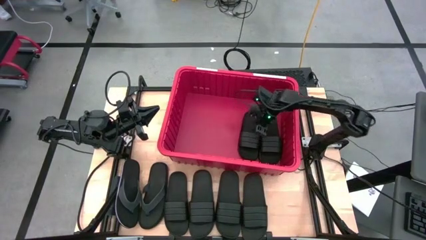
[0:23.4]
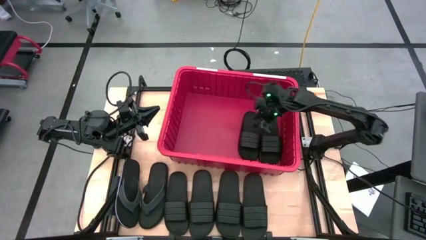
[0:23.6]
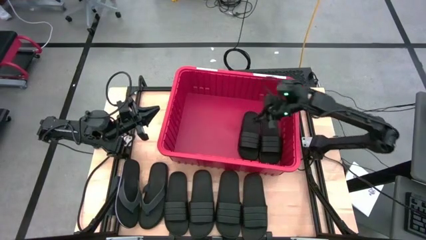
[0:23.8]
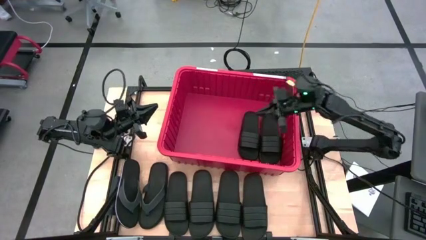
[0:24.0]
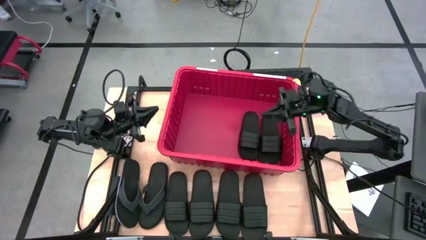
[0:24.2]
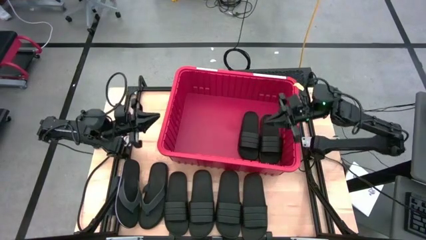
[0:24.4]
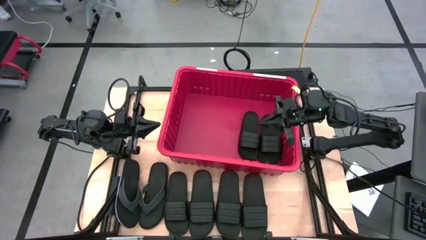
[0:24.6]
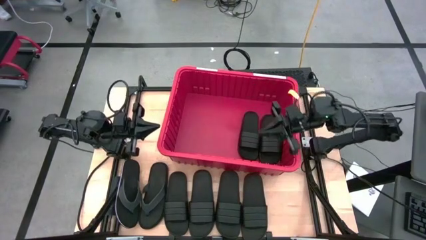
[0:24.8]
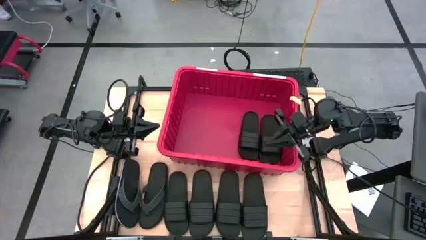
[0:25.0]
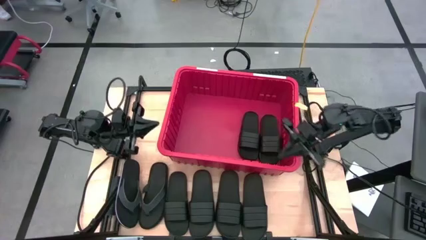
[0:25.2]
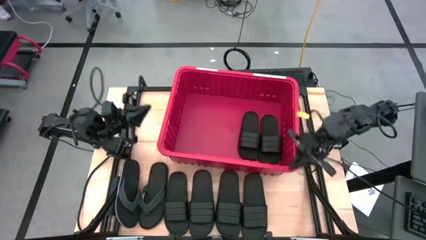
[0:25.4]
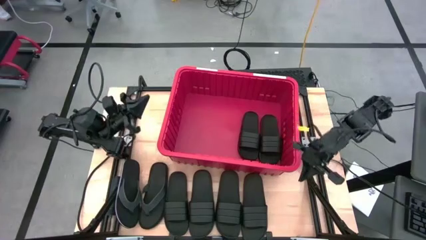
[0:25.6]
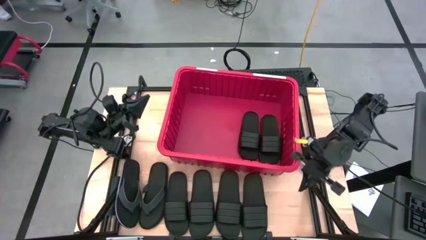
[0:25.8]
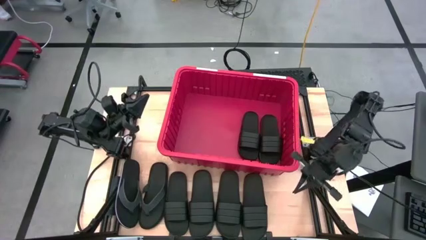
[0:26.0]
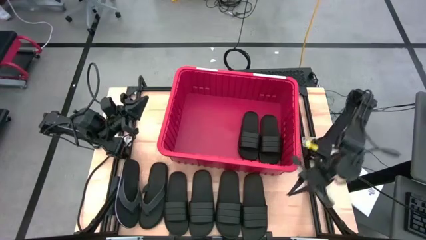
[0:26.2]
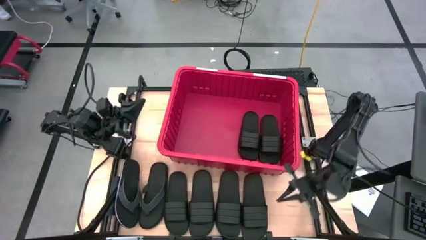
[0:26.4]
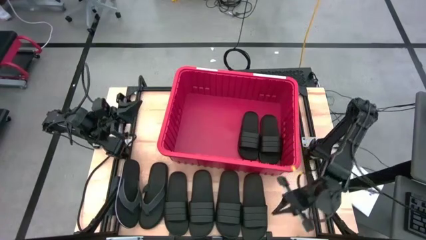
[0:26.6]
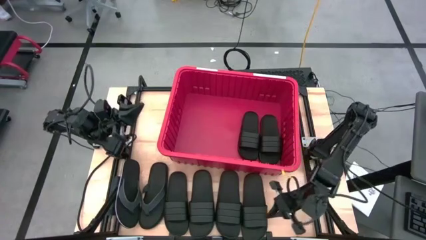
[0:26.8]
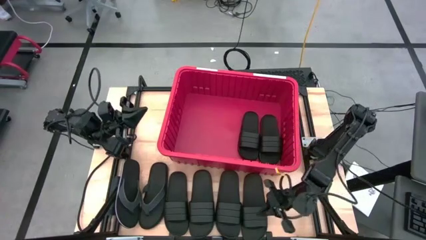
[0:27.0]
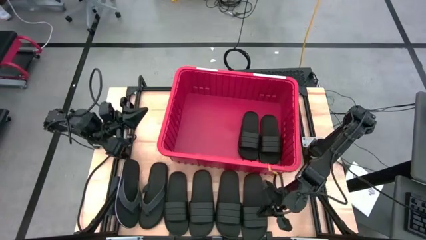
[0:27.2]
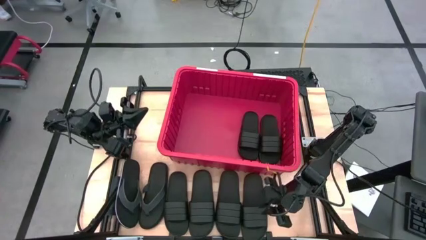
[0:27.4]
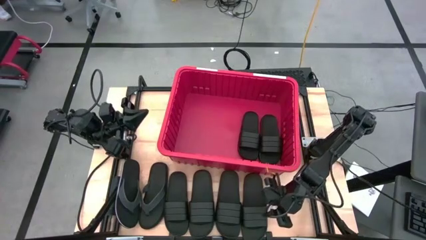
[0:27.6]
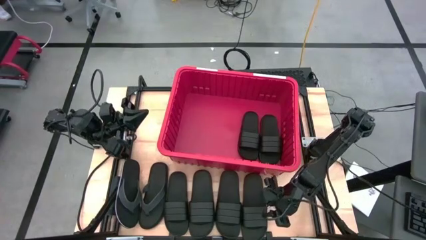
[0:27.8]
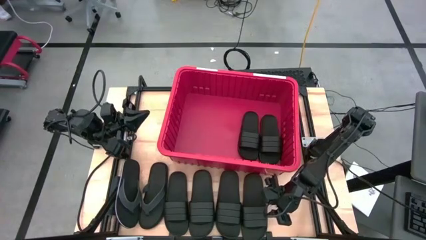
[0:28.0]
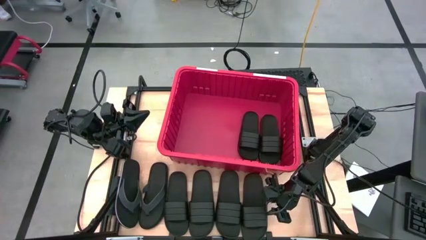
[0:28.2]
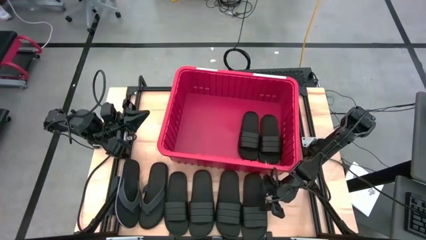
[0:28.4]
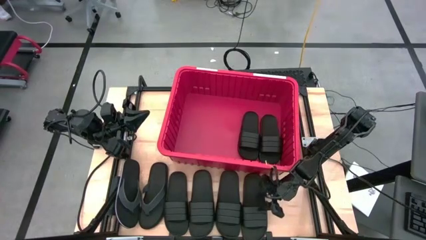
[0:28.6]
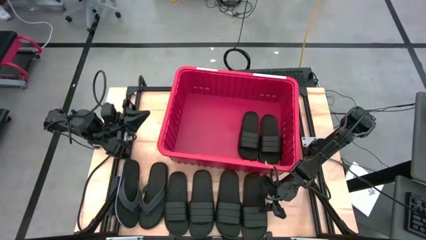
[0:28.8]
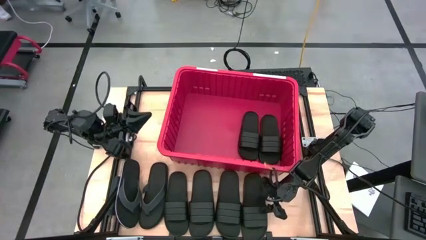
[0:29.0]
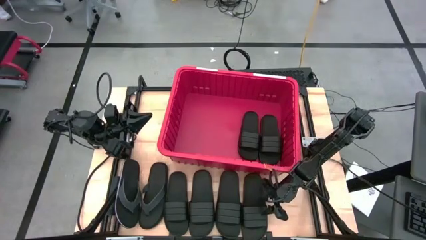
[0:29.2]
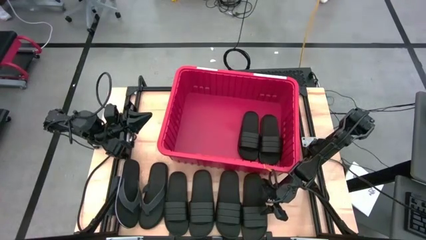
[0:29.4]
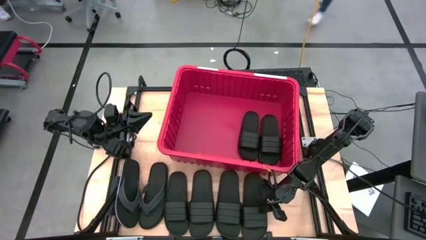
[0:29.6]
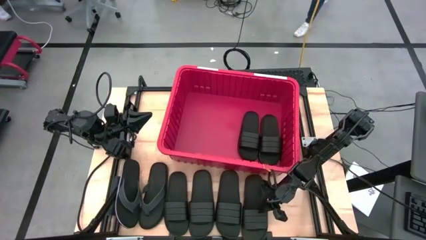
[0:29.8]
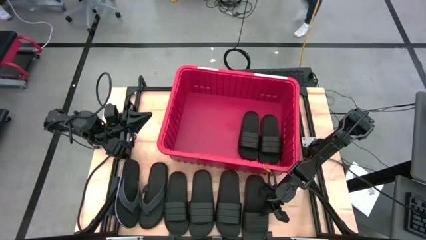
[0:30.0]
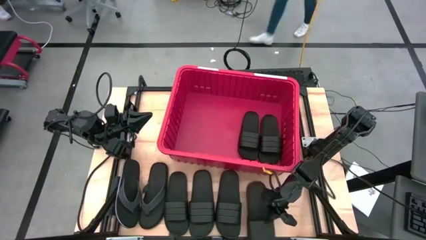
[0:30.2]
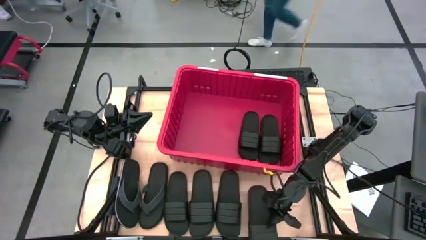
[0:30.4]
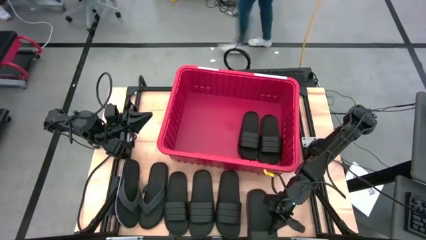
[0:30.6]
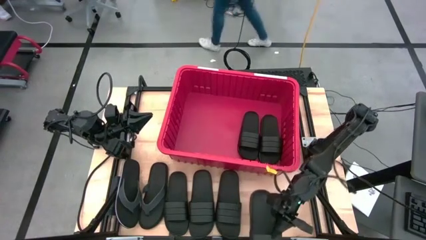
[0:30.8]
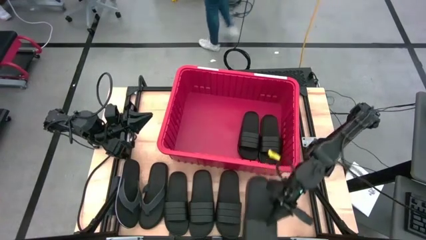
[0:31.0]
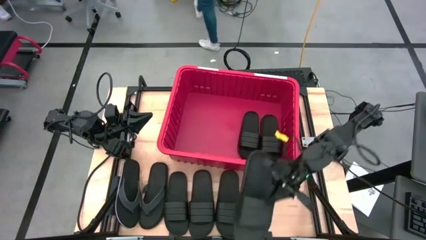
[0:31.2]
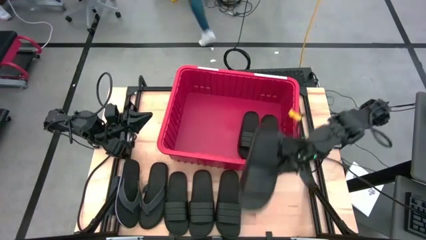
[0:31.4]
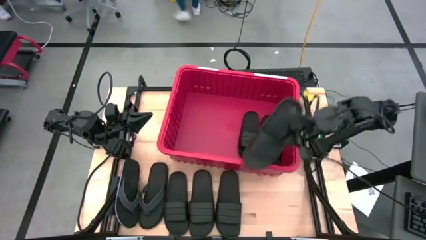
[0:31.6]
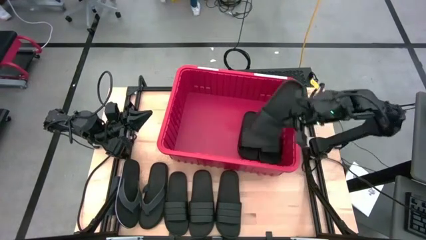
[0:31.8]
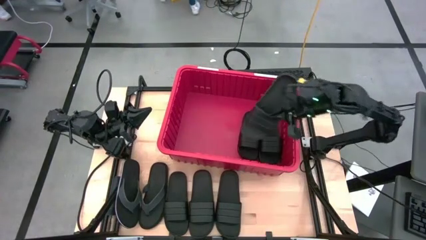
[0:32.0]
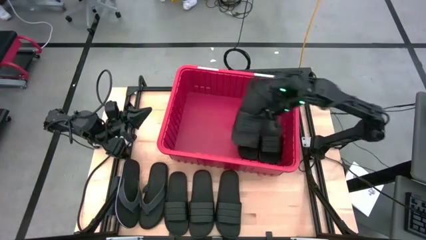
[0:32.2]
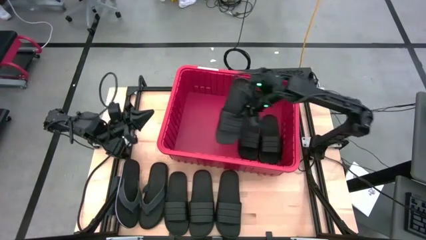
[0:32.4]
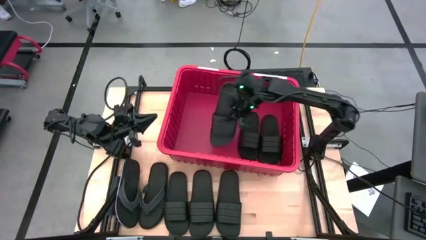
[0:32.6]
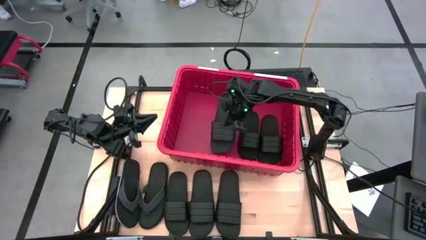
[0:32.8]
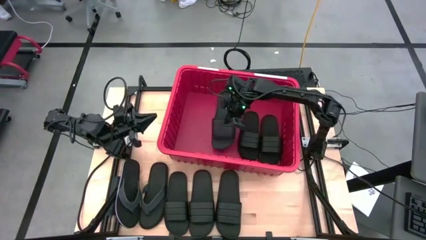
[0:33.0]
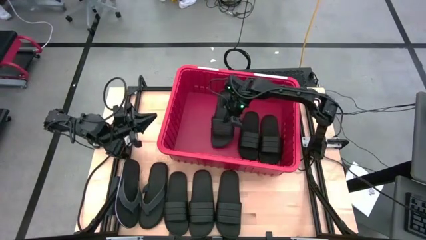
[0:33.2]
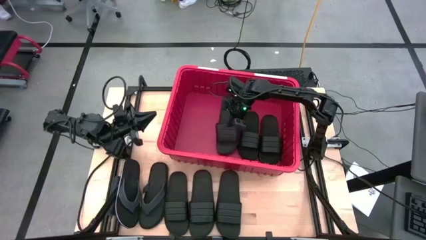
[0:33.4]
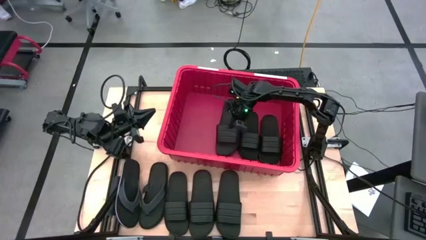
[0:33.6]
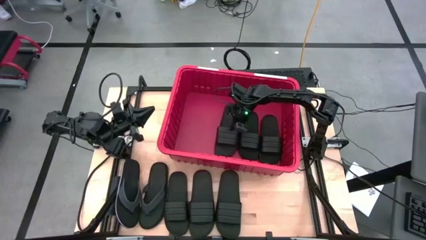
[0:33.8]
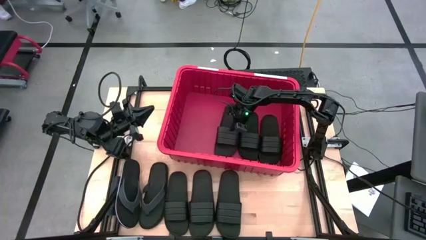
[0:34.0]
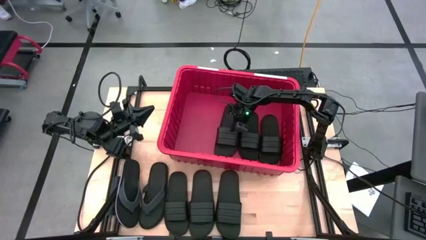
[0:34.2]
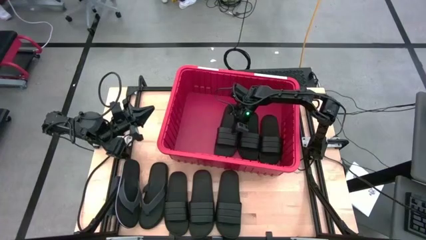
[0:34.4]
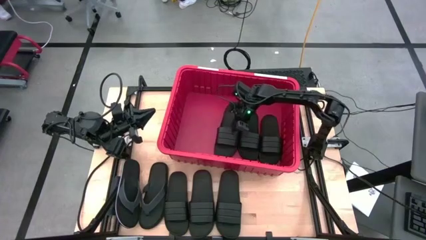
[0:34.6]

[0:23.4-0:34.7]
Task: Pick and place slides into bin
Put the black slide into the red bin

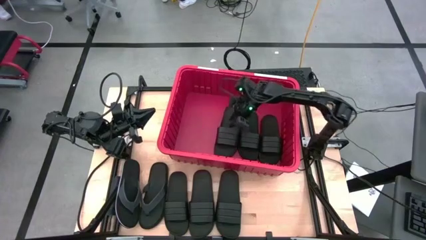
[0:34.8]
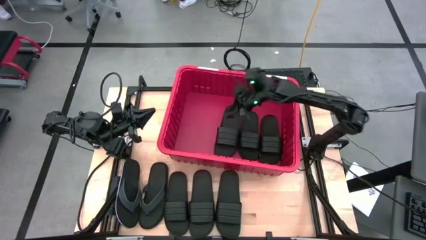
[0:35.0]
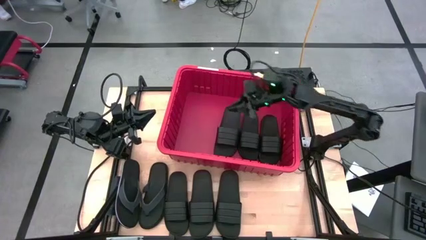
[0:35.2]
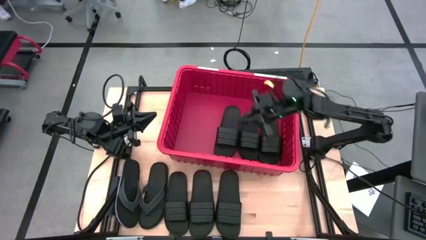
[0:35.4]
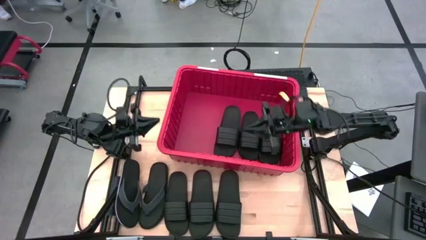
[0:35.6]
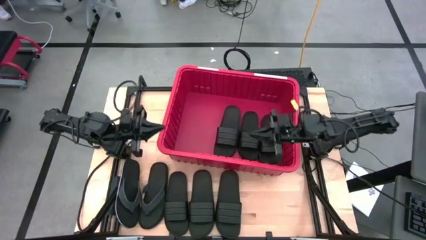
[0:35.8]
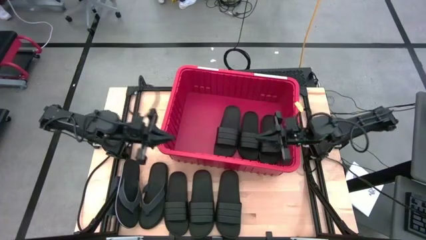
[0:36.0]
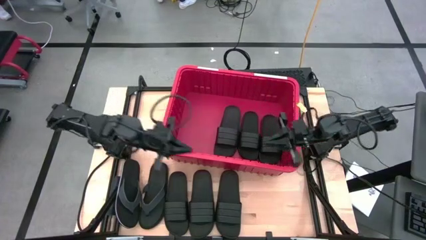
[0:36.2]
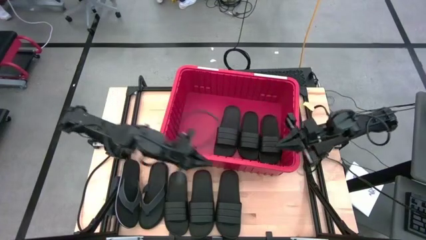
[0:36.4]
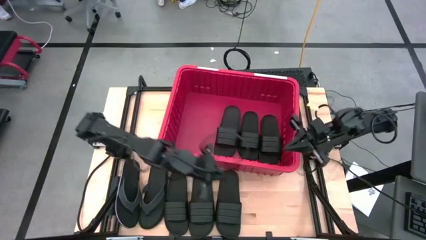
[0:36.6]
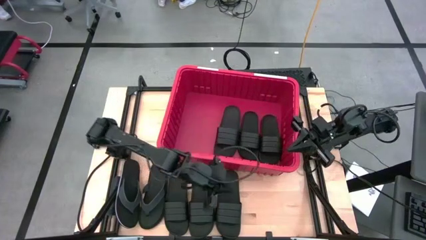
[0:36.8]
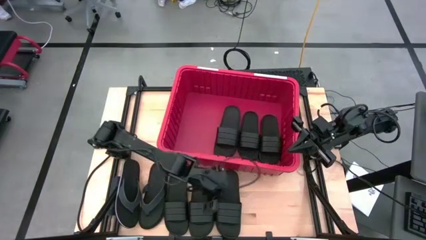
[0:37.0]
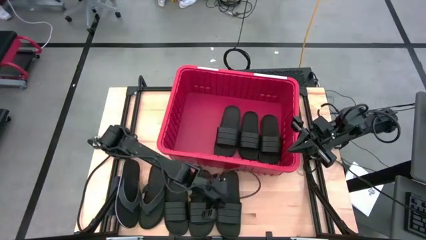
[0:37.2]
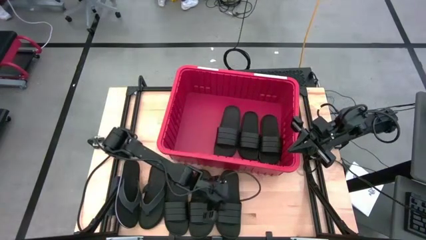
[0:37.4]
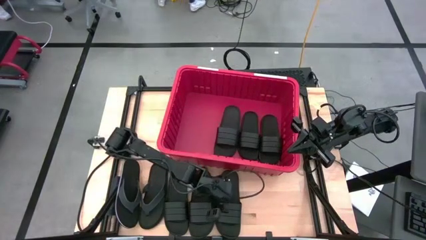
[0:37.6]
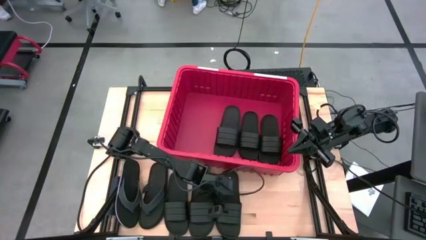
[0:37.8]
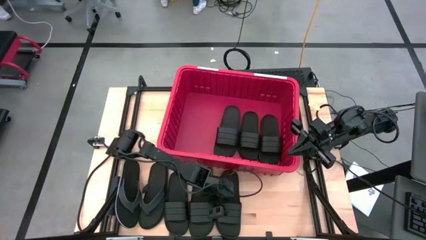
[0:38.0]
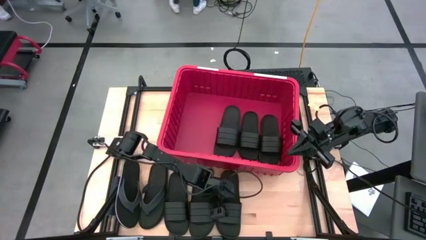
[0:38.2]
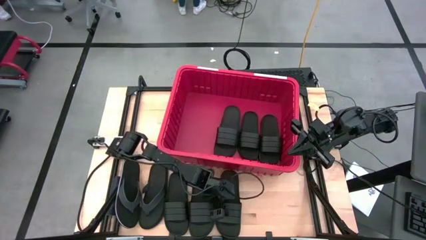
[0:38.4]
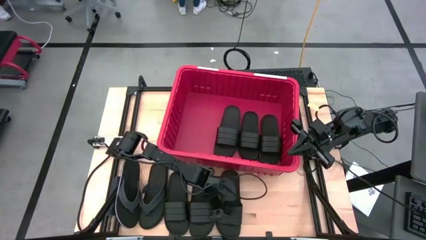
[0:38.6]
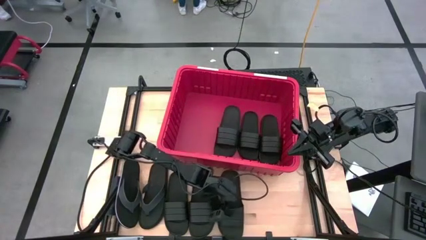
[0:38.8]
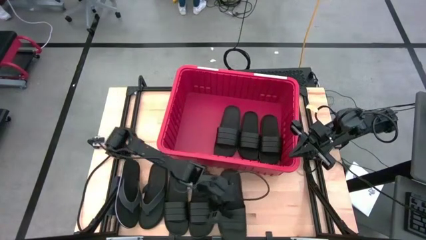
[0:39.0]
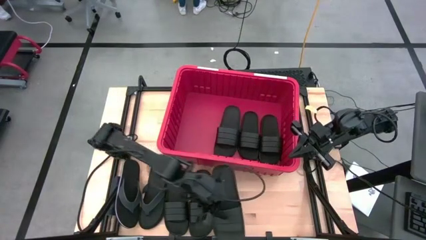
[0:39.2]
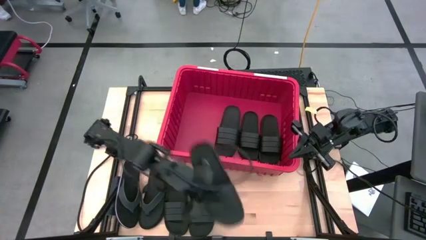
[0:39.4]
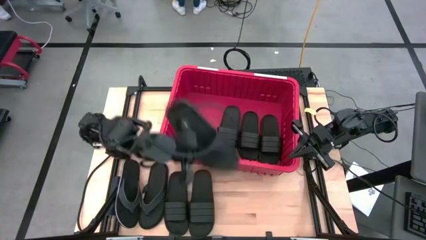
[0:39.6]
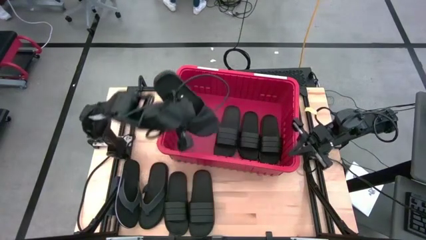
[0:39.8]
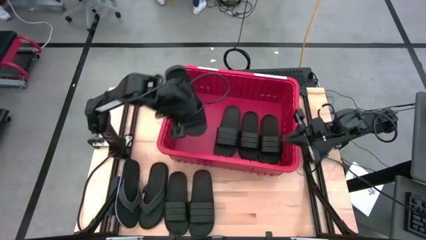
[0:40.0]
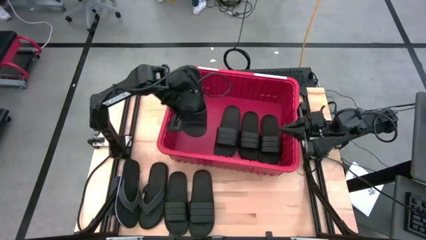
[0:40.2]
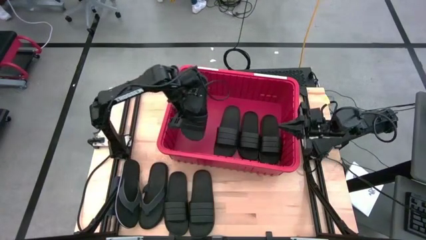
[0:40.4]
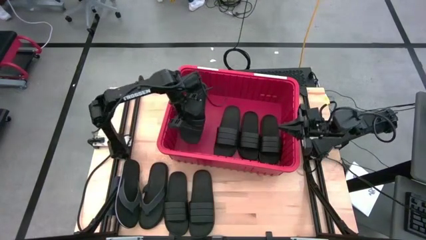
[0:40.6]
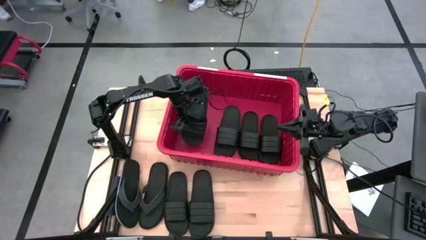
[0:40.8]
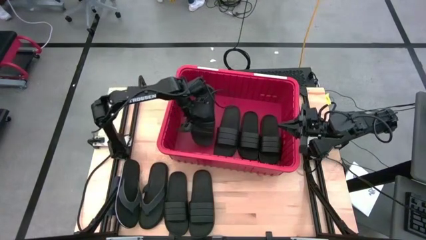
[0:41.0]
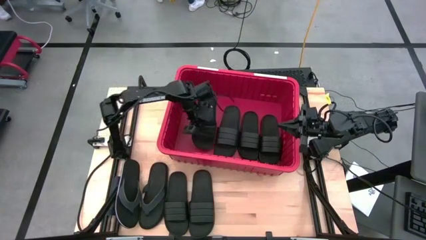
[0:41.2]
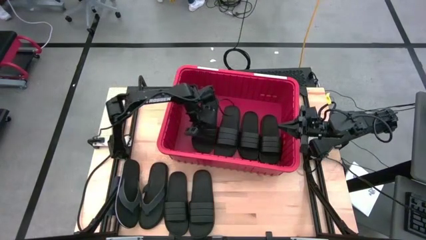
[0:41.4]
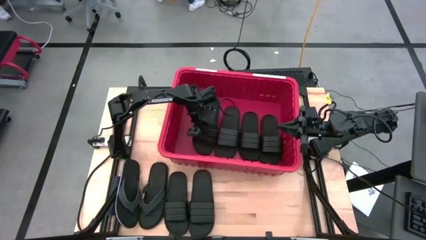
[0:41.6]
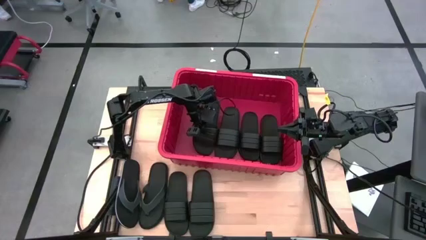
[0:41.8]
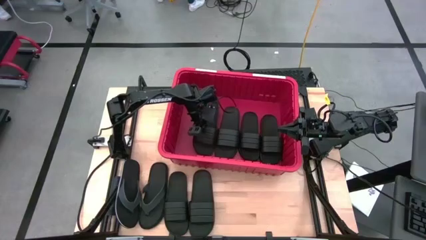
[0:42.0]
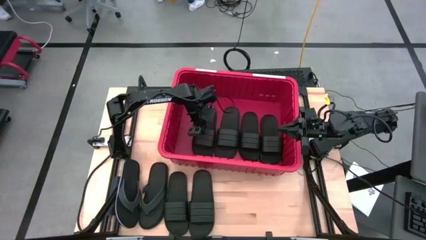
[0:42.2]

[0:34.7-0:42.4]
Put the black slide into the bin
